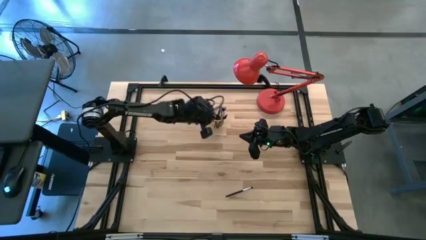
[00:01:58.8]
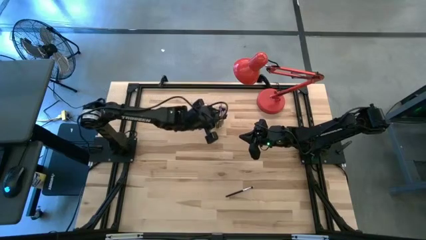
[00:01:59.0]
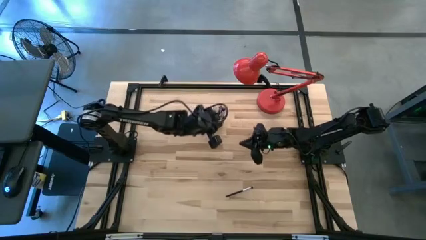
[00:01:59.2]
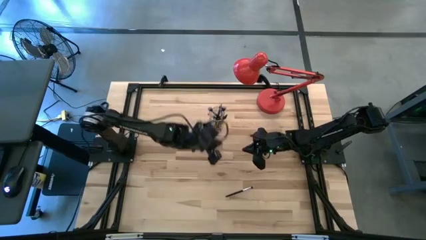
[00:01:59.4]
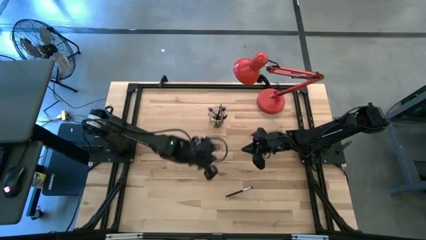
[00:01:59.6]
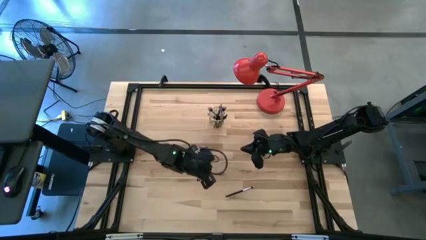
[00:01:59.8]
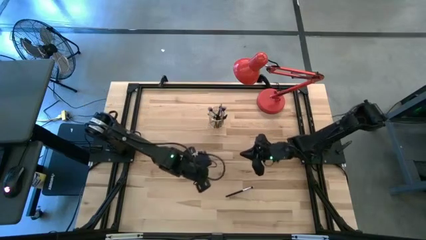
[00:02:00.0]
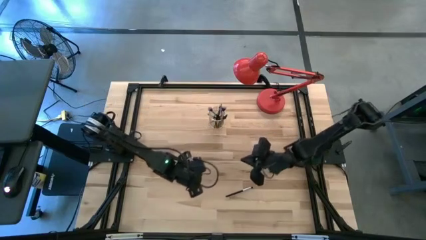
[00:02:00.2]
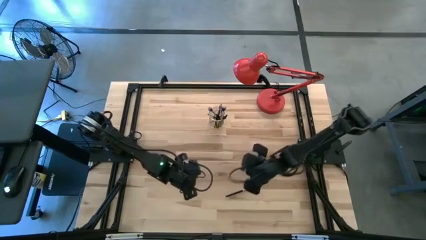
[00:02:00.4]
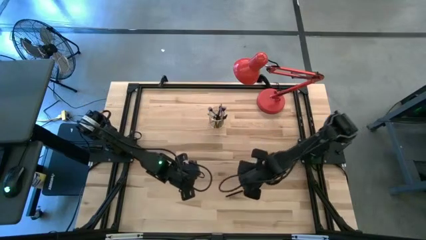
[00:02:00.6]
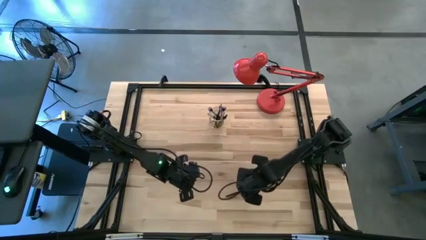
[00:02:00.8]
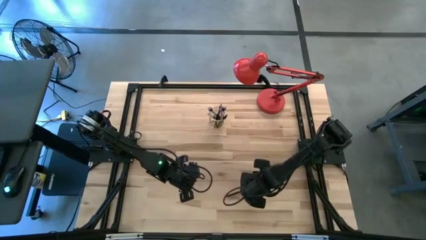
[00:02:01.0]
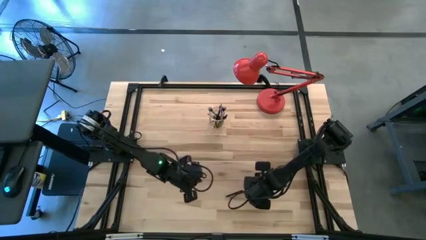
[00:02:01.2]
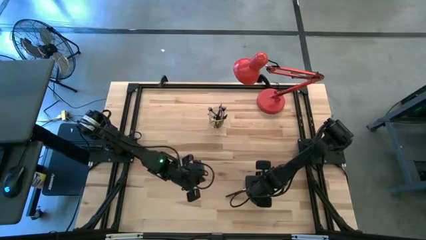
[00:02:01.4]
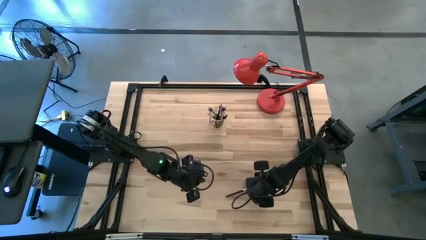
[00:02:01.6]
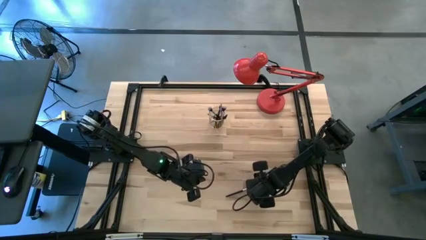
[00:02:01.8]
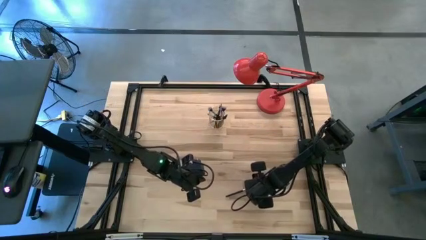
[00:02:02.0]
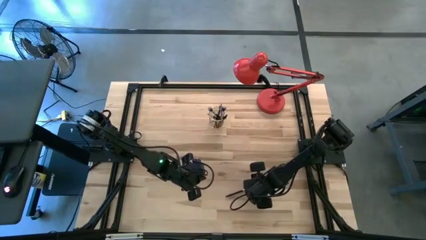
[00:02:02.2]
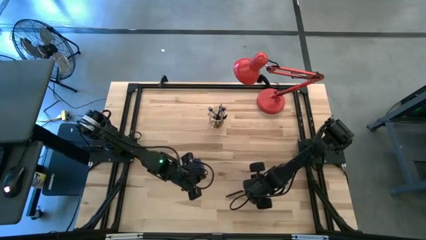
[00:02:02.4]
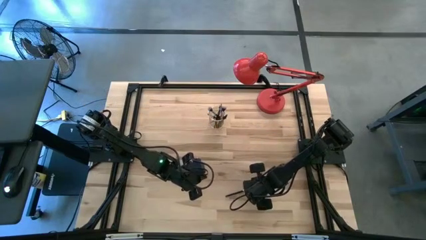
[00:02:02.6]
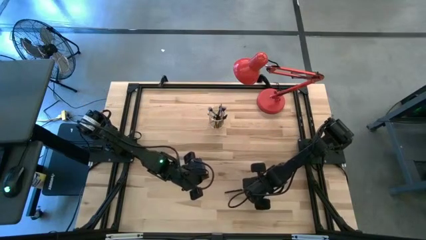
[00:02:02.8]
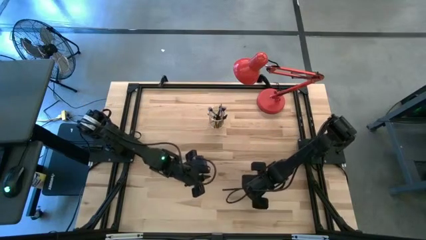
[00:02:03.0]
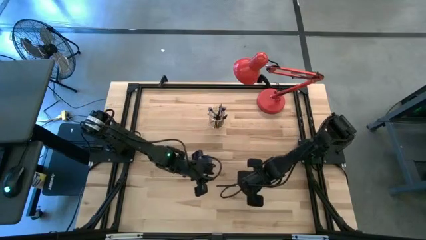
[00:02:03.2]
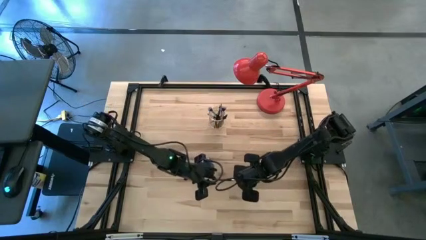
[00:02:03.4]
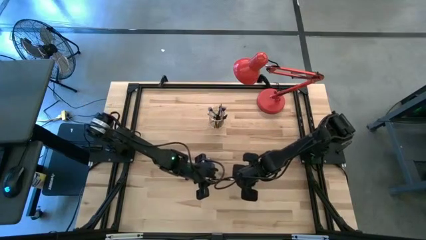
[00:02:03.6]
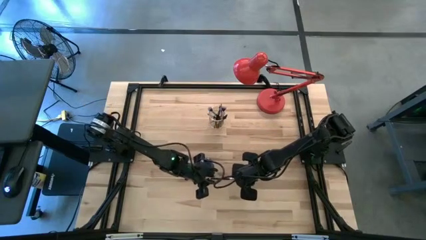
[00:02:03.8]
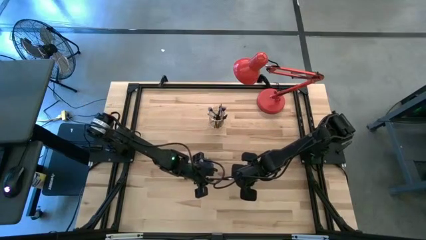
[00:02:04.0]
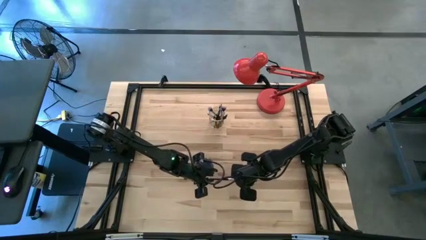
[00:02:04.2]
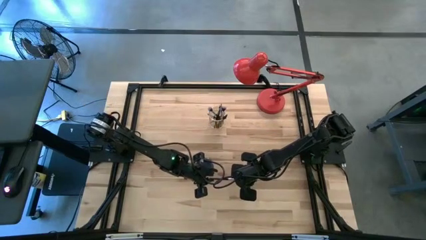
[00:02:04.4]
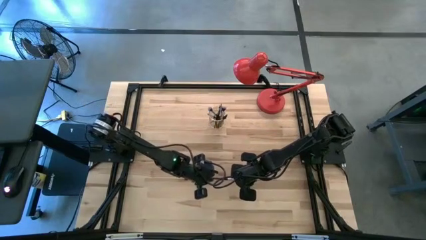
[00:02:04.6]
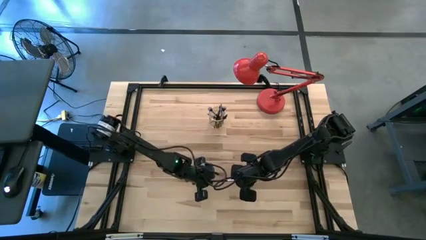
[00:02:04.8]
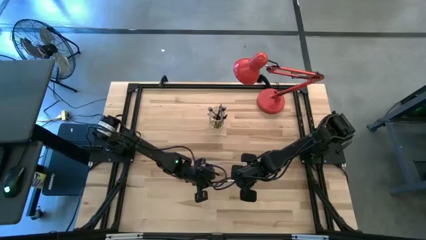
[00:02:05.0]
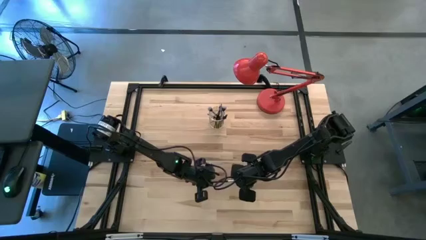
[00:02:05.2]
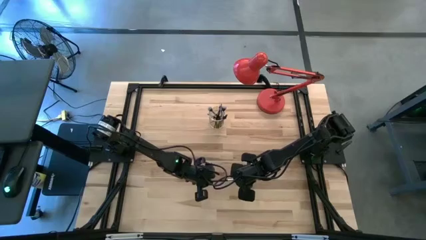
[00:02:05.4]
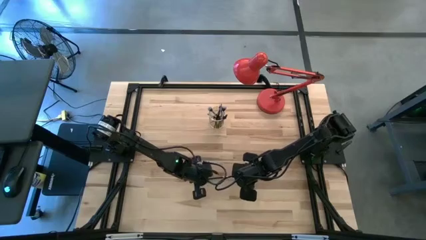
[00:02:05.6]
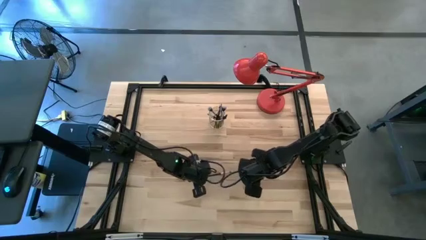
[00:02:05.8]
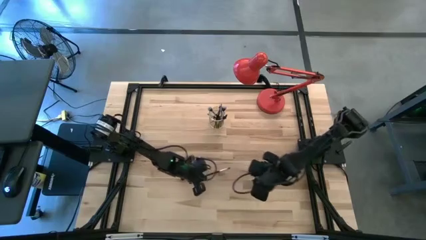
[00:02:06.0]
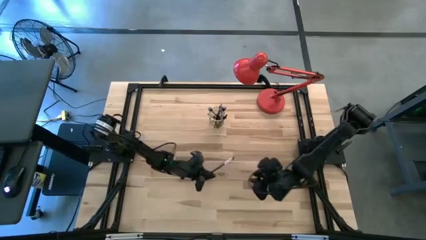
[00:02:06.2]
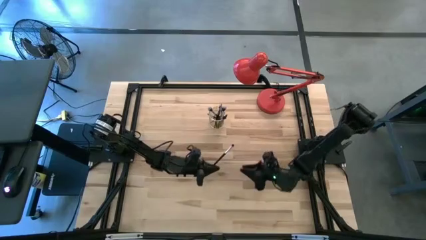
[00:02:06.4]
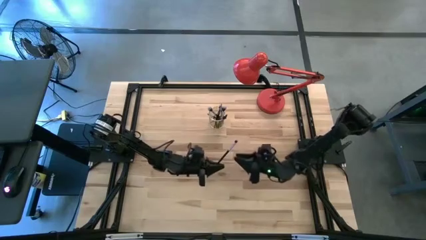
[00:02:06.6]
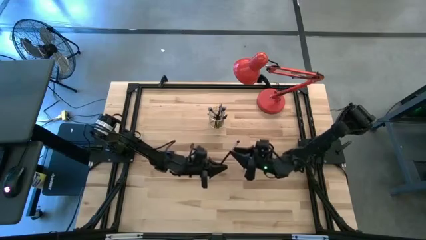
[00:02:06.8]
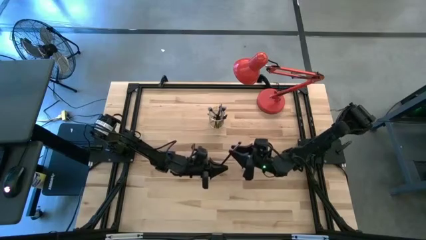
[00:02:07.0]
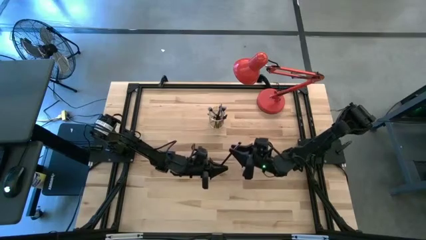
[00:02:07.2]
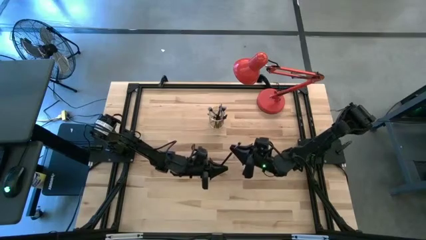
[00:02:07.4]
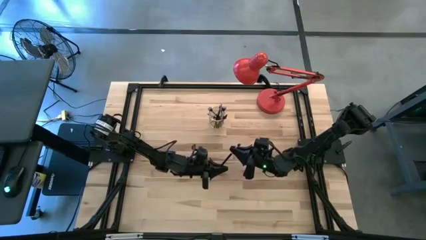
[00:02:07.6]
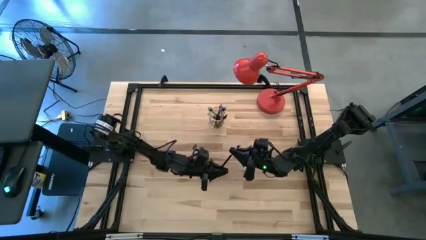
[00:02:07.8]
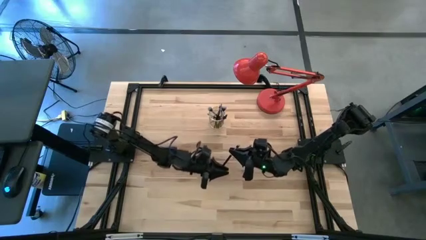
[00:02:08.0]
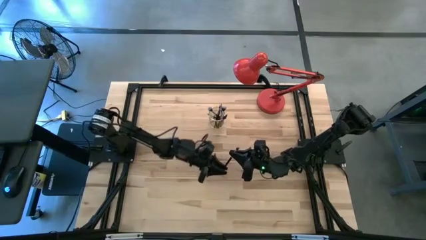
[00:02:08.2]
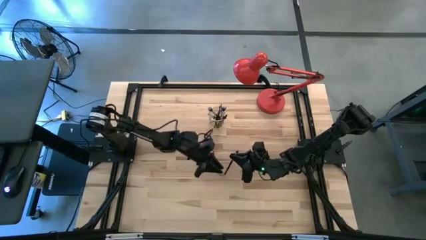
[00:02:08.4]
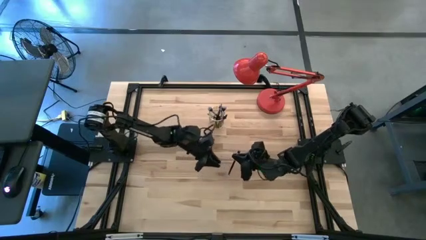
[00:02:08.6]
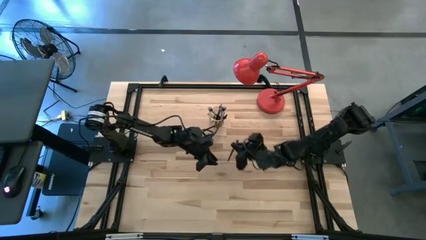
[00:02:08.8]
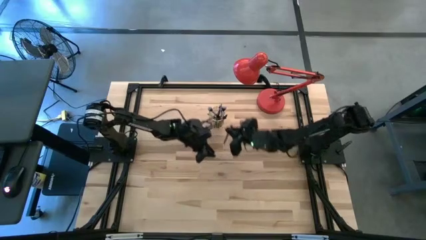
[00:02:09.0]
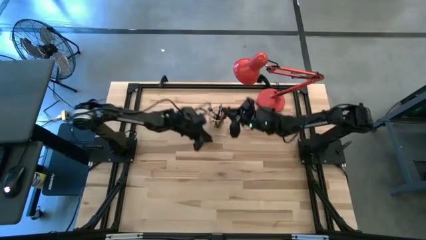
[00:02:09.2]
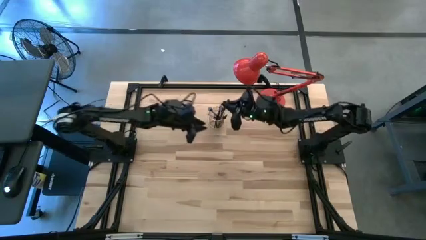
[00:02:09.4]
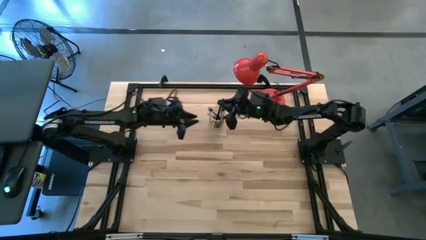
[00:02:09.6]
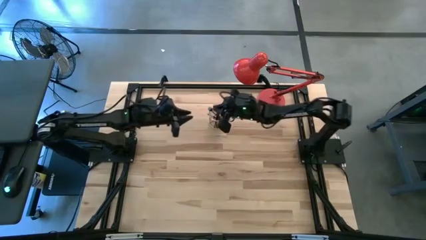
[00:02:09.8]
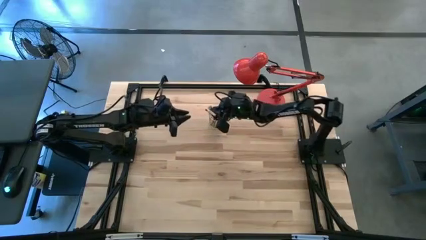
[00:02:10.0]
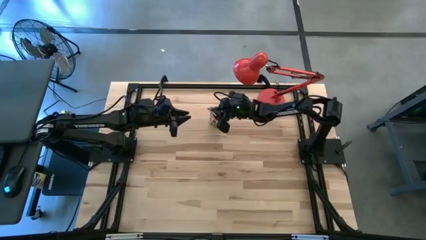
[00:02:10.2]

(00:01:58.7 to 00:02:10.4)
Task: Pick & Place Makeup Brushes
Put the foundation brush into the makeup brush holder

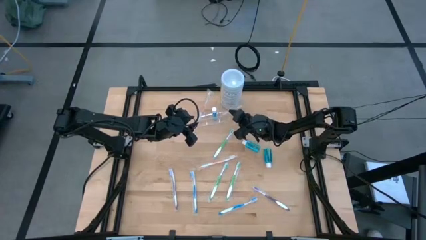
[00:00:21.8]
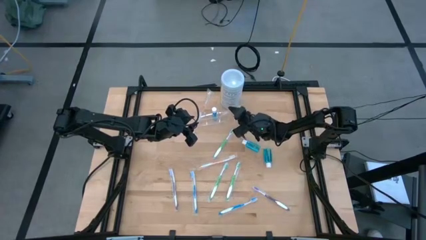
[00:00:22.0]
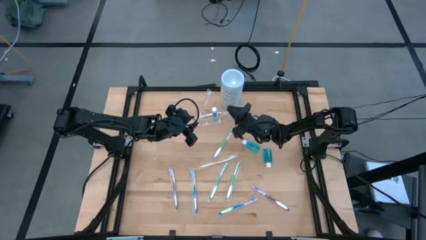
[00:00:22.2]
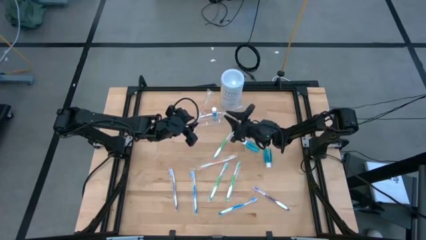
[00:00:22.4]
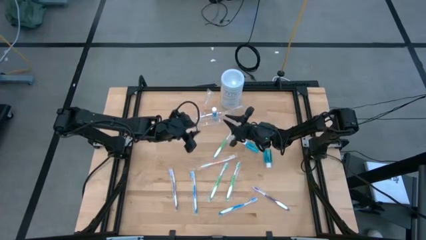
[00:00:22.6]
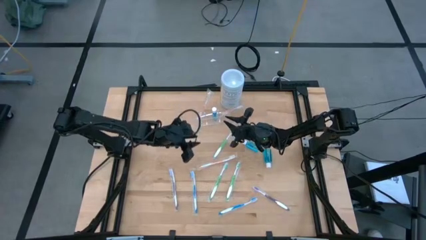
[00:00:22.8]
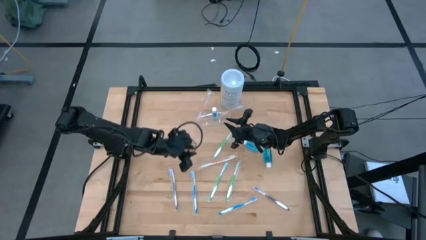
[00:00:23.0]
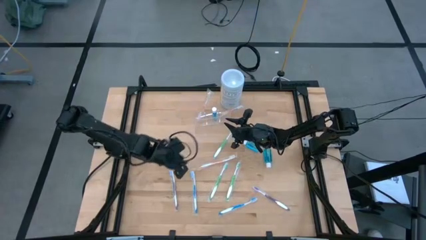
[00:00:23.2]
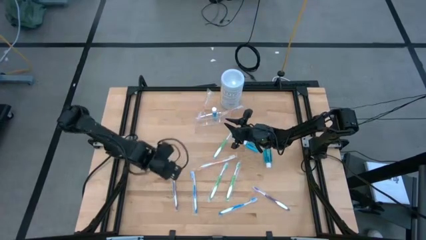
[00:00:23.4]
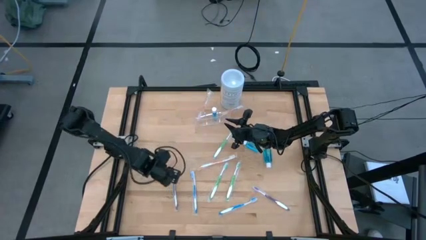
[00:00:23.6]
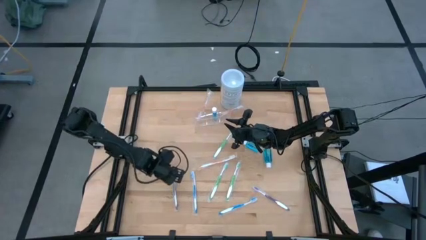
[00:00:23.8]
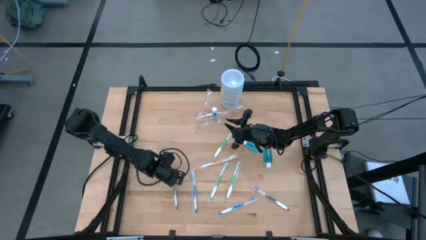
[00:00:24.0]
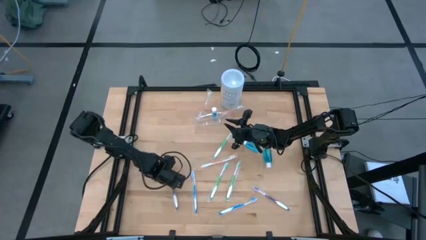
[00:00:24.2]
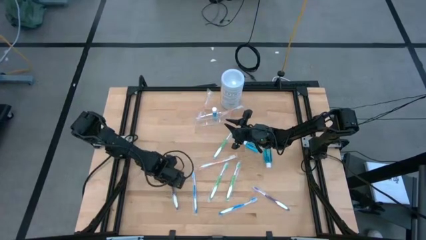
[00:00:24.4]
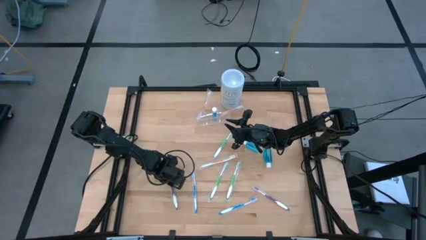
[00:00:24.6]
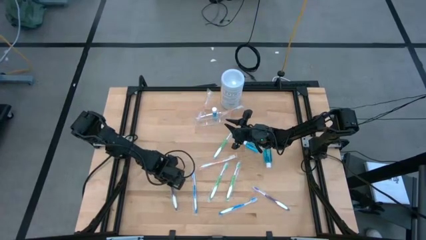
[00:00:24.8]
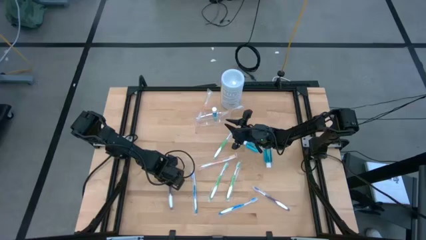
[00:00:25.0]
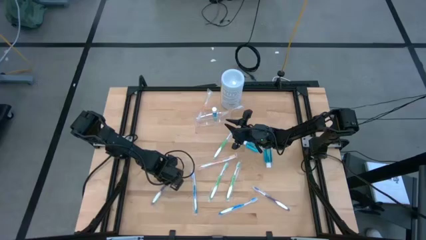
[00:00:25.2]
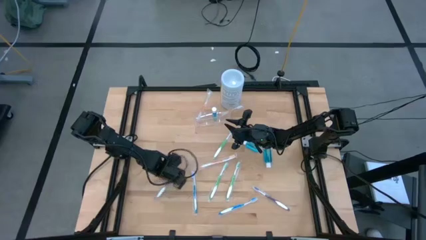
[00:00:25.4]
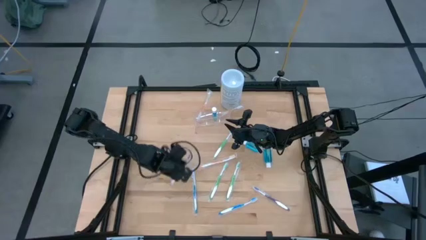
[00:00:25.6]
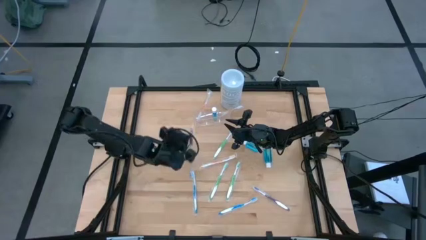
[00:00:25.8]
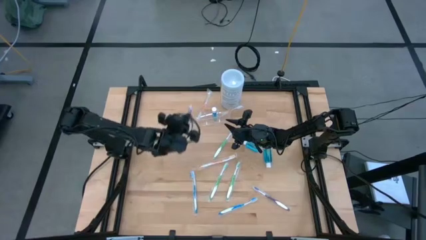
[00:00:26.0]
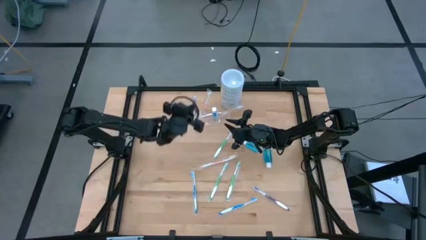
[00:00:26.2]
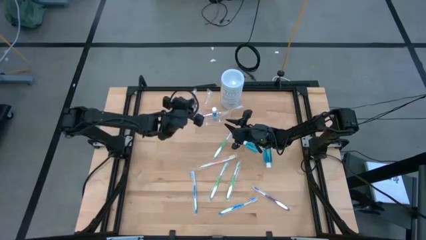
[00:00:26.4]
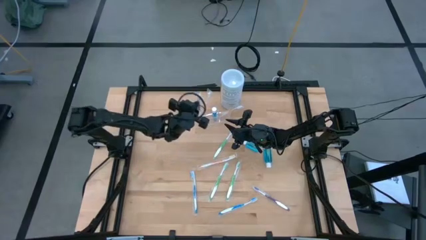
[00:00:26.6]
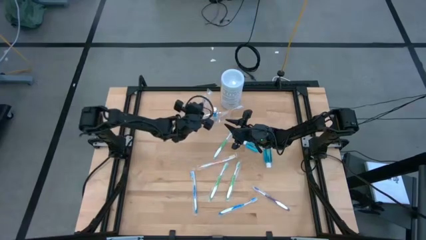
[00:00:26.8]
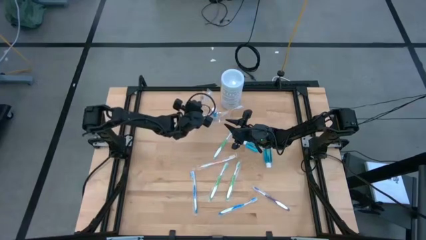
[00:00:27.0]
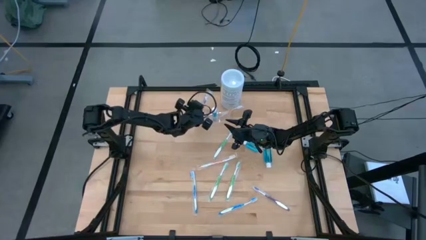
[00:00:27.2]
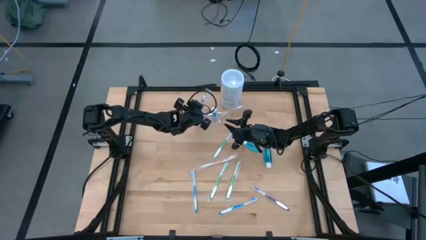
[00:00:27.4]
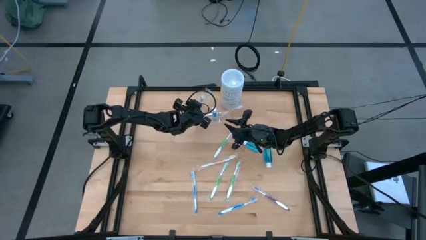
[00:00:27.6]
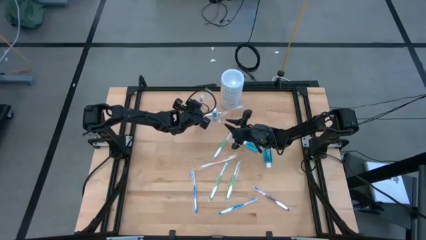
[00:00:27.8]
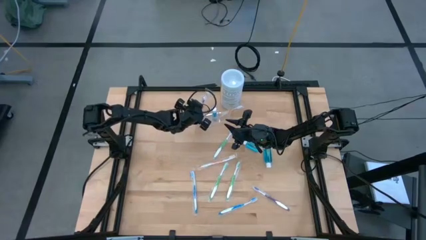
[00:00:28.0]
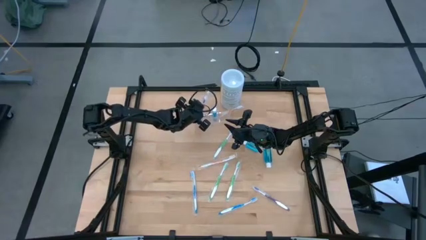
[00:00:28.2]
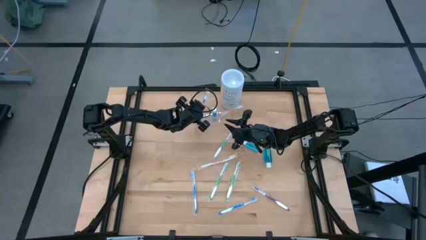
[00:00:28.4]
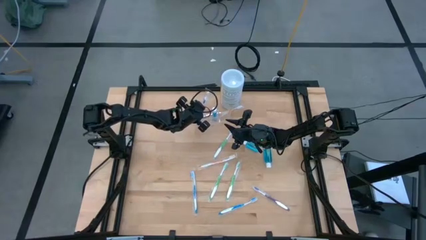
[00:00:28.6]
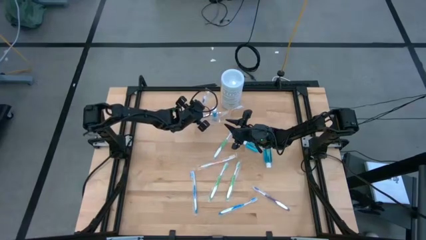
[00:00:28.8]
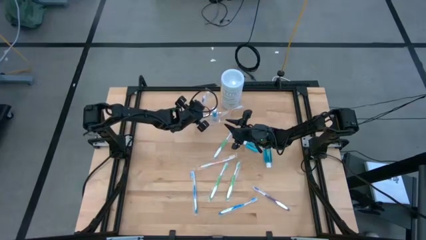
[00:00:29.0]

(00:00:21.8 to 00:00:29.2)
Task: Pick & Place toothbrushing station
Put the left purple toothbrush into the transparent organizer
